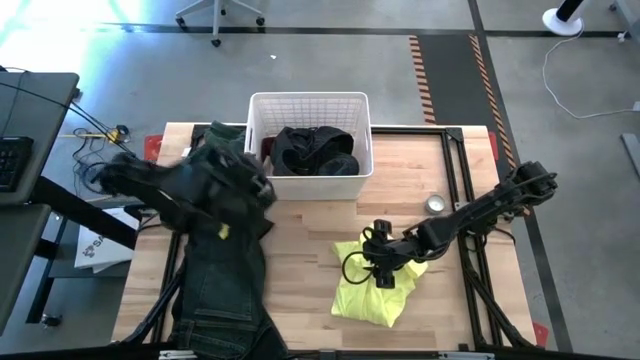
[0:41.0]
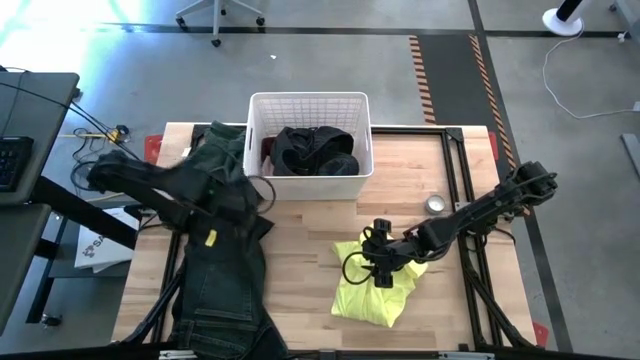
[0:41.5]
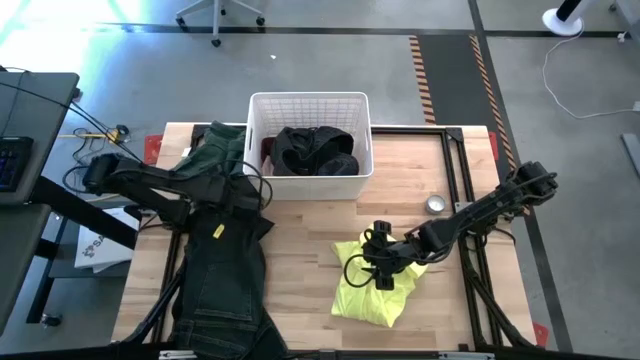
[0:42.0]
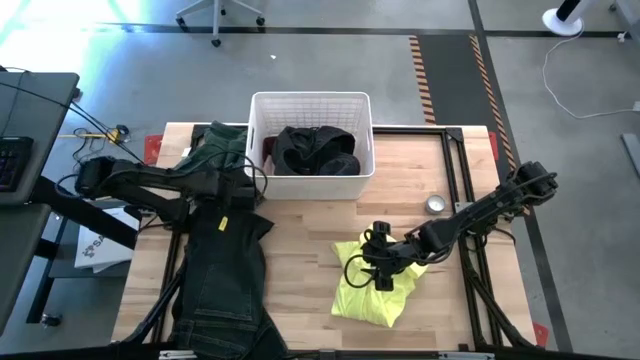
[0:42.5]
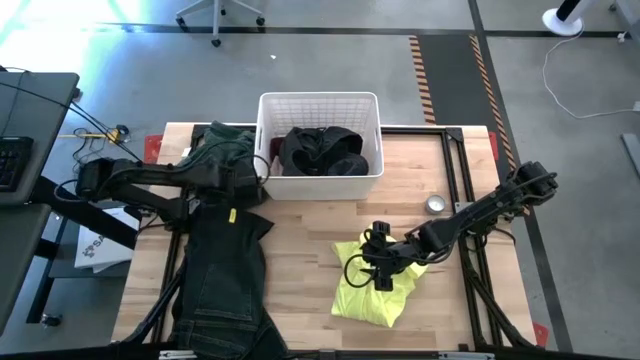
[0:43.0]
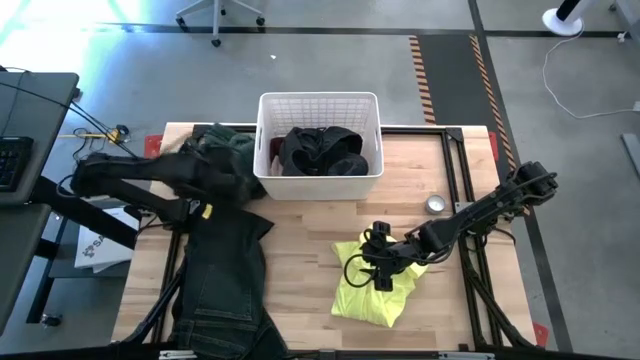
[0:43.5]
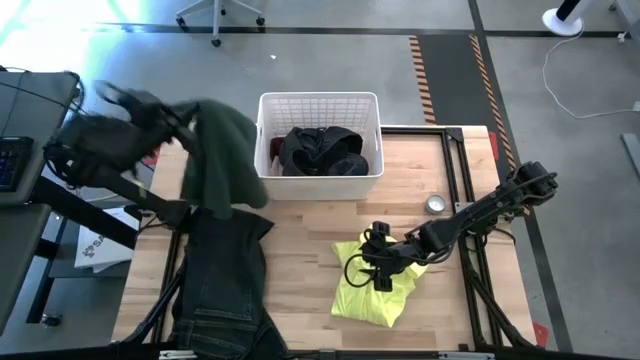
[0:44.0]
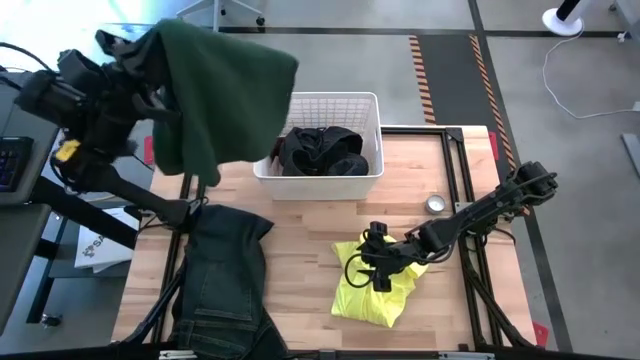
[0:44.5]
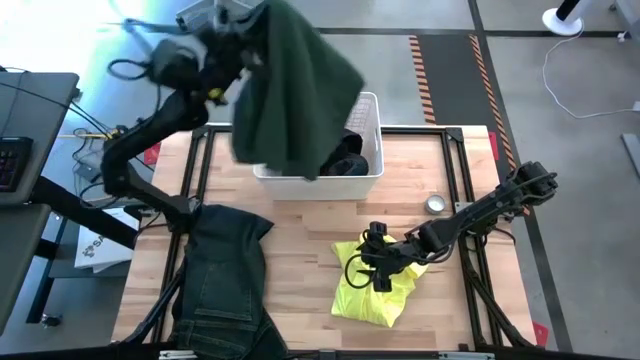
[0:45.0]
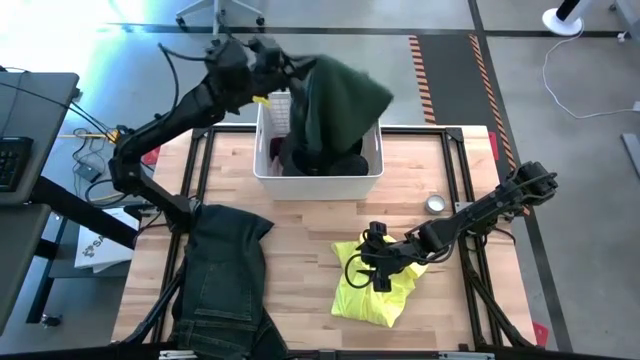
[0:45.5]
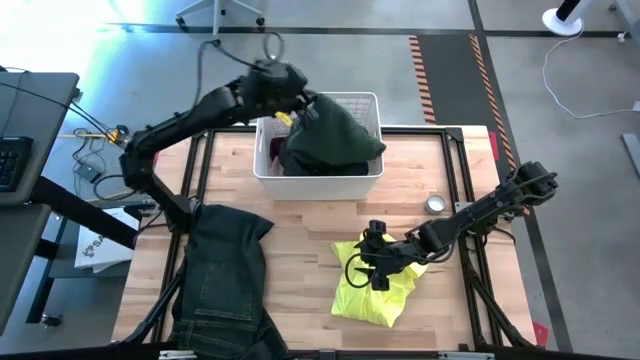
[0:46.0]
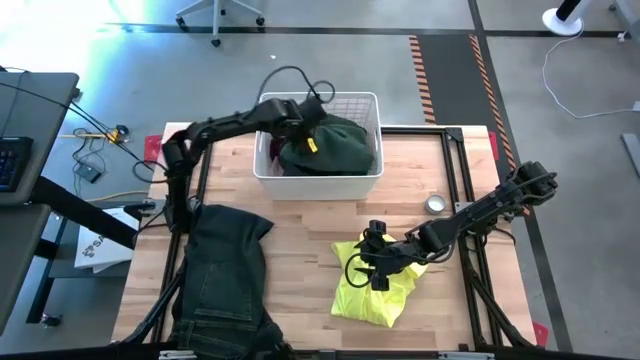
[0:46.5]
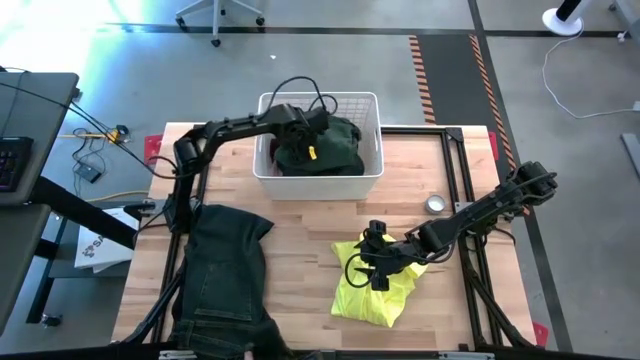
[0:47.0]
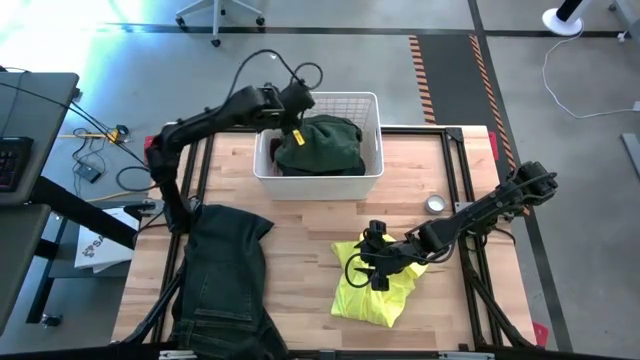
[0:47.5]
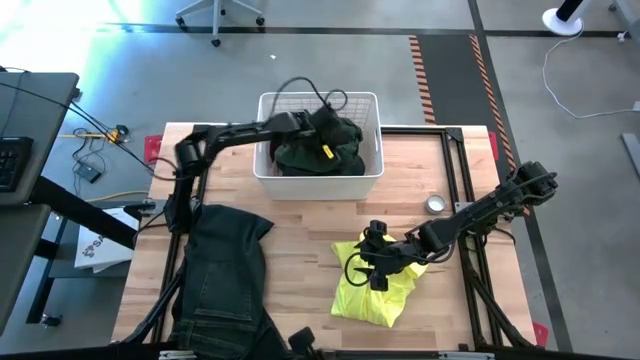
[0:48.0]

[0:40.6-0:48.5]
Task: Sort clothes
Put the green shirt into the white laundry bin

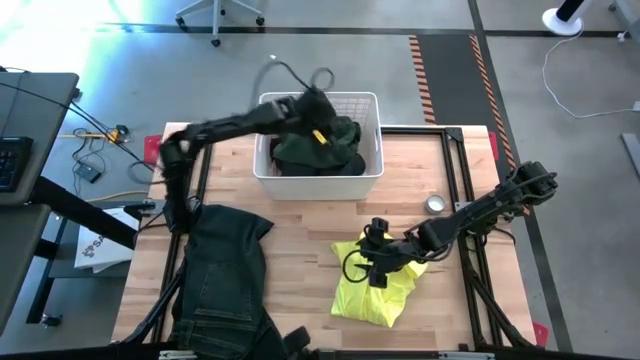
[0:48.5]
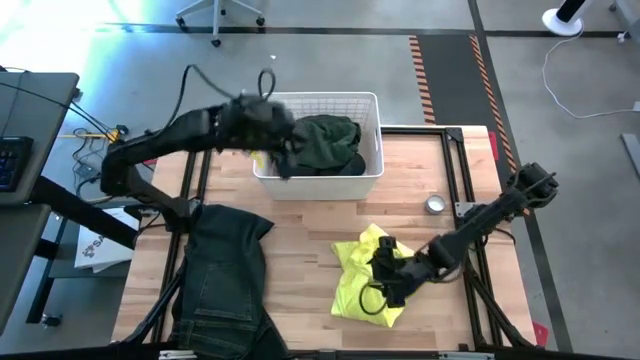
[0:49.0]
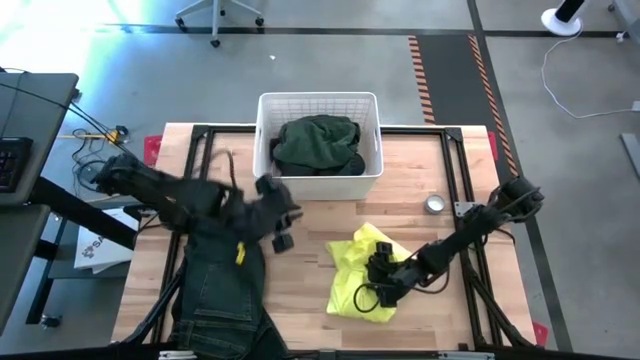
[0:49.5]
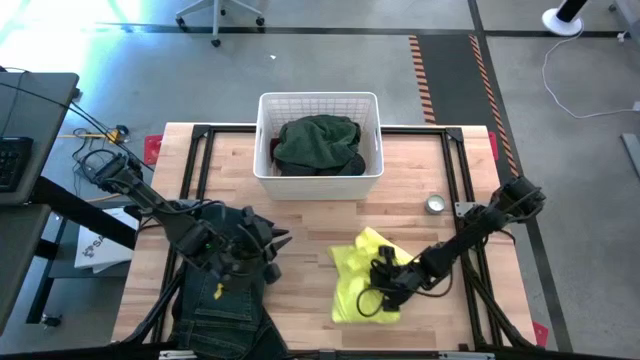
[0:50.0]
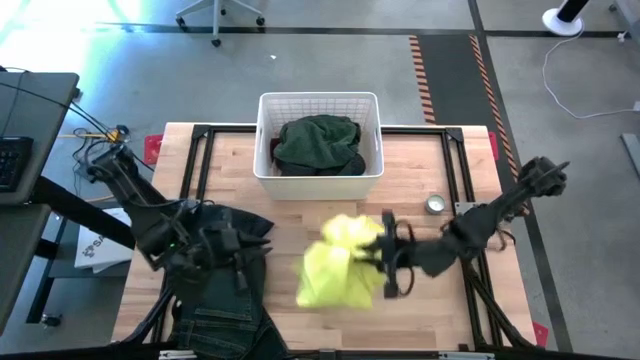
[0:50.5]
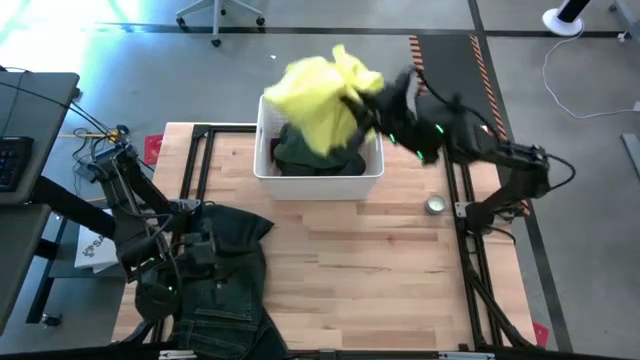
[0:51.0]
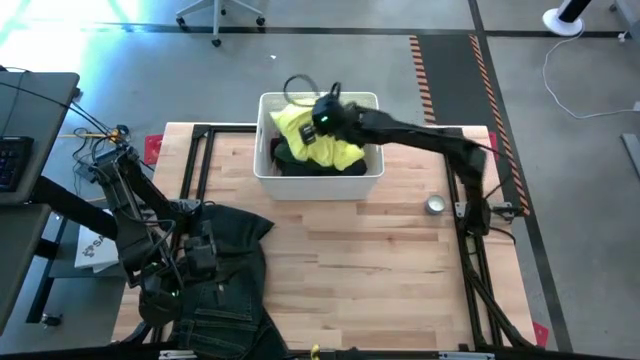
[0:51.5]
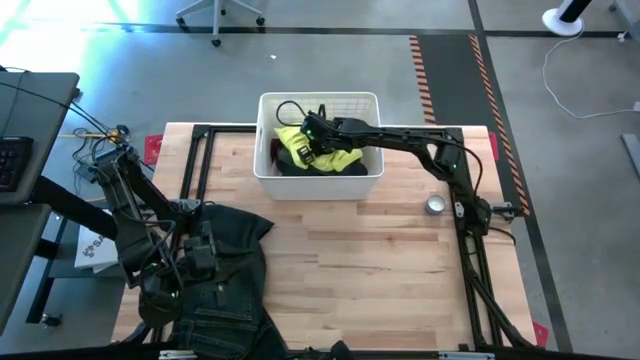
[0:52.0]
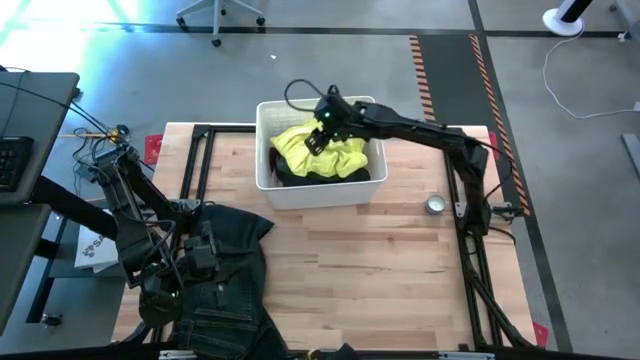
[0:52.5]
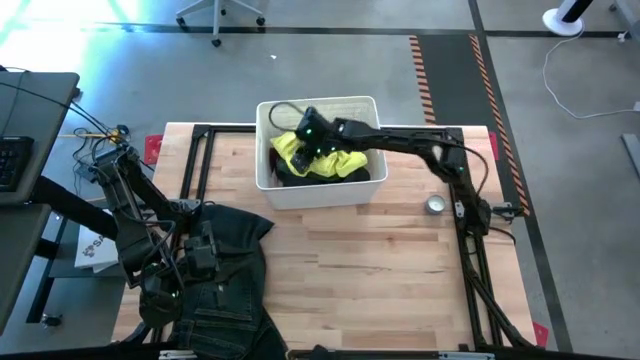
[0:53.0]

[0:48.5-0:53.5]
Put the yellow shirt into the white laundry bin

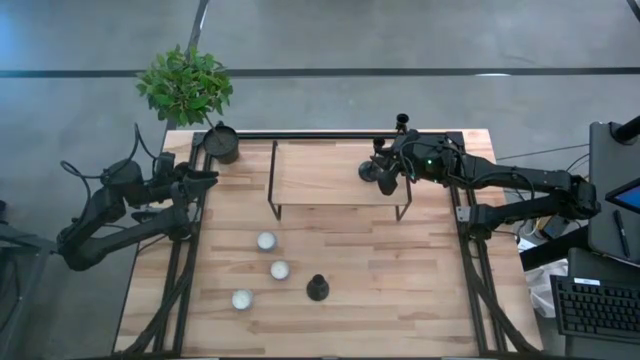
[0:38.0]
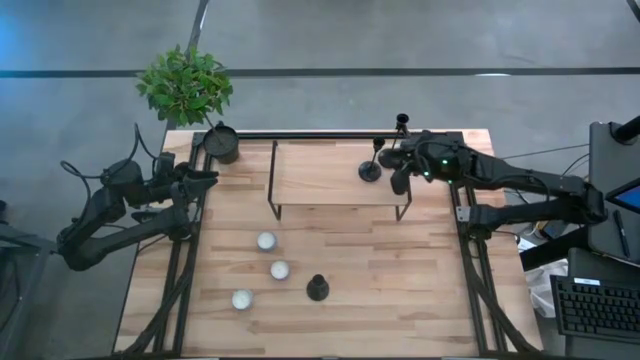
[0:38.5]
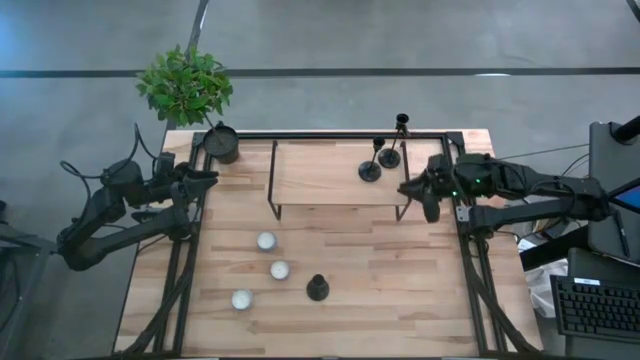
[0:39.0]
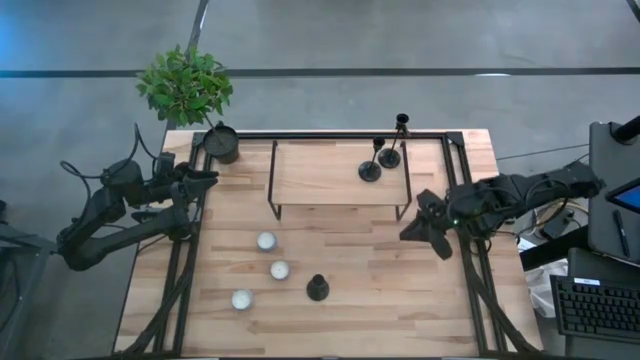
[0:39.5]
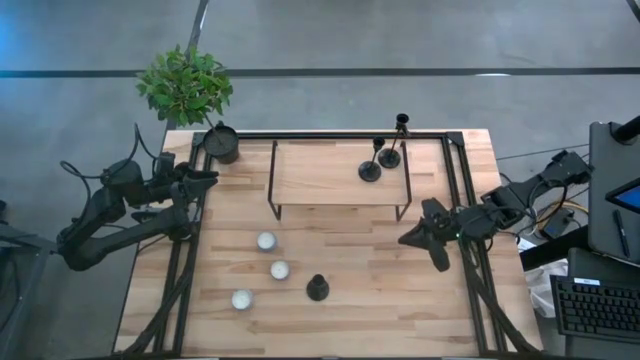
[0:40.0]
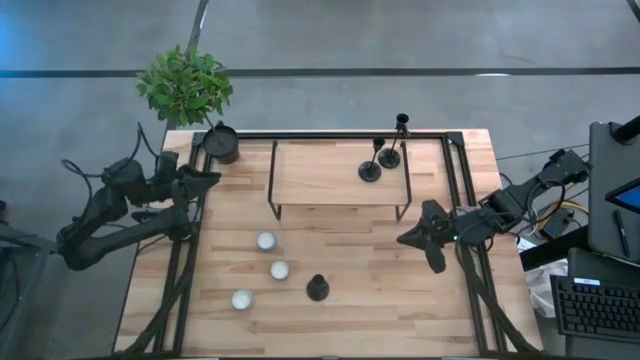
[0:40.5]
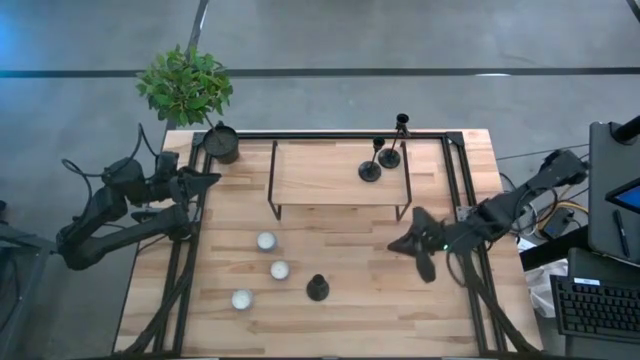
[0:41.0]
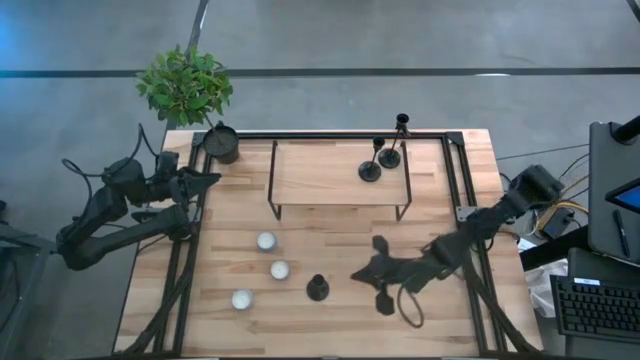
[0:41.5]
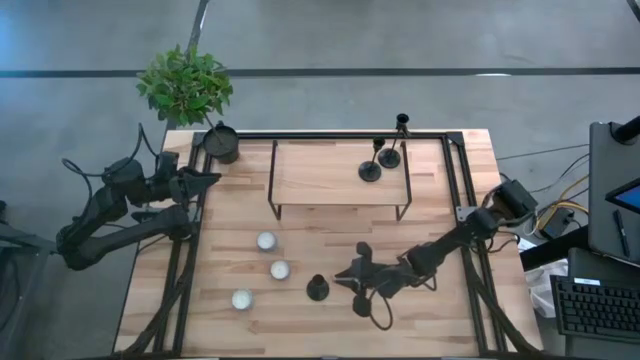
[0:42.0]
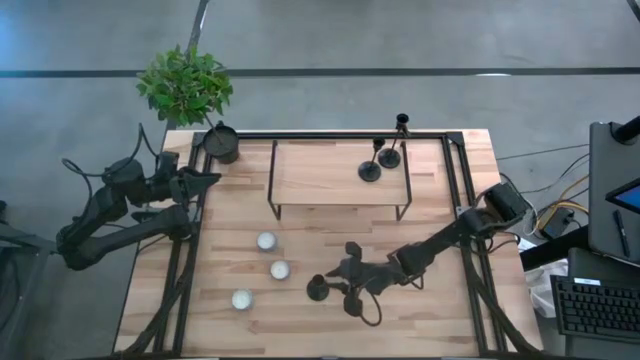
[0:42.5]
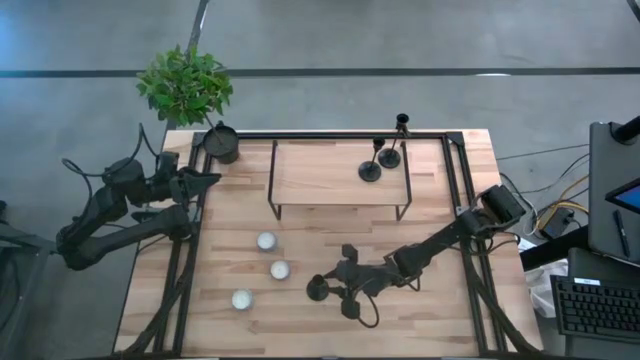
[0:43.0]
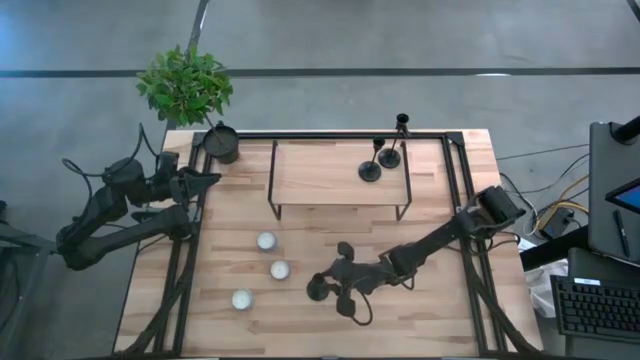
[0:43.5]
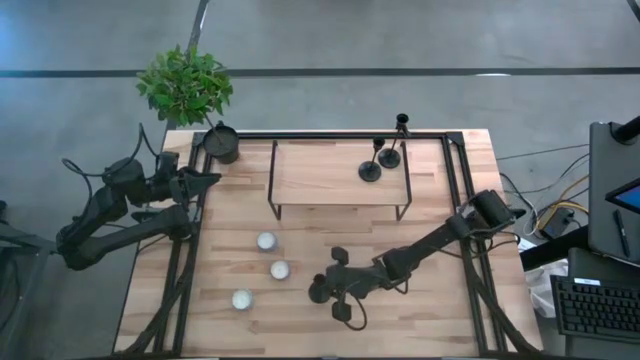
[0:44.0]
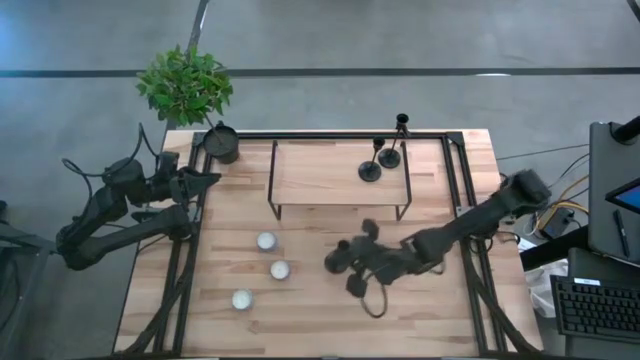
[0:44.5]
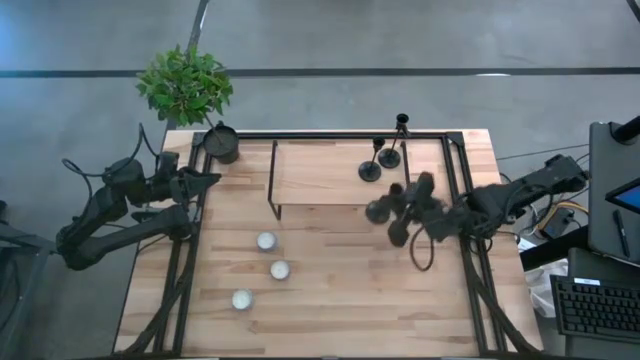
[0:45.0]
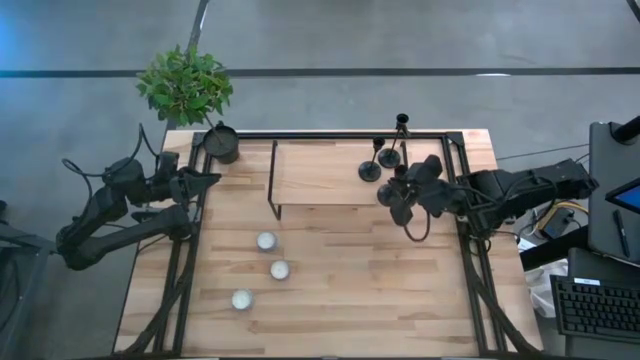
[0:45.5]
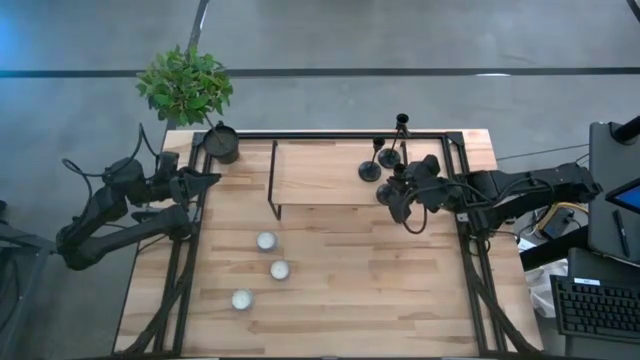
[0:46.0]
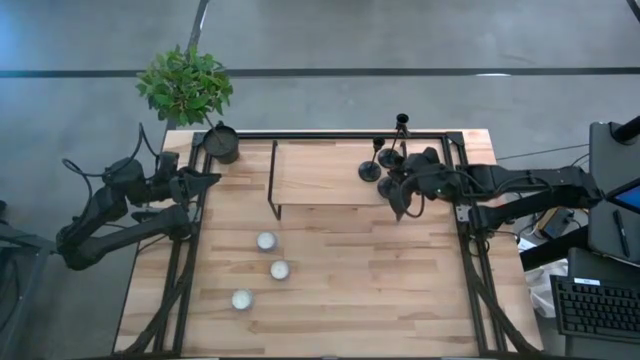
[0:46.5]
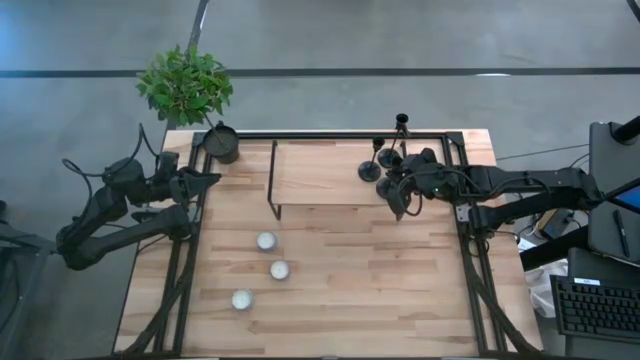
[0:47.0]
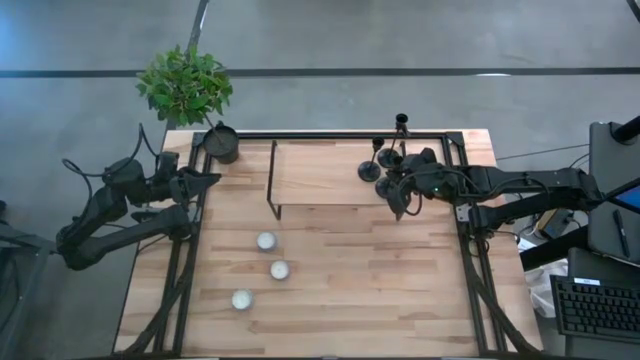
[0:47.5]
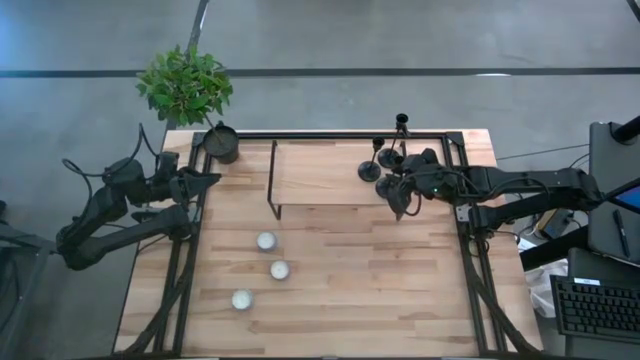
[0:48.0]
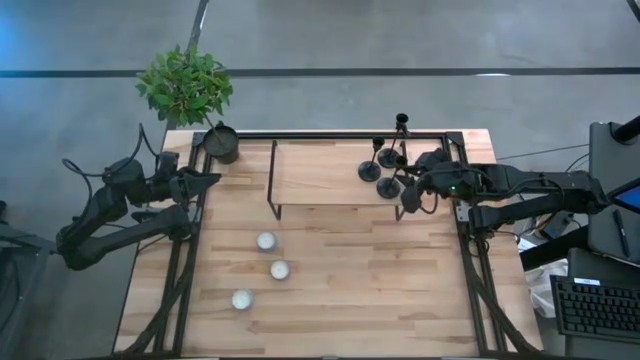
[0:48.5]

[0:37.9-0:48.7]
Task: Pick & Place candle stick holders
Put the black candle holder on the shelf
